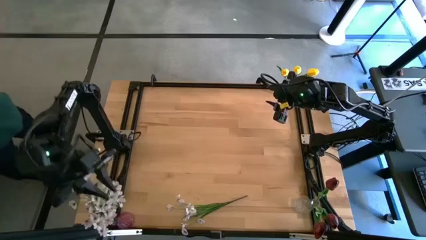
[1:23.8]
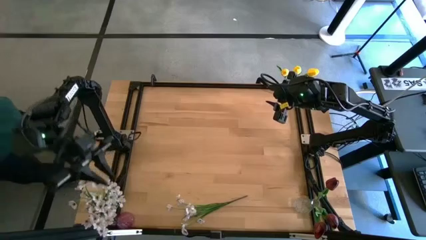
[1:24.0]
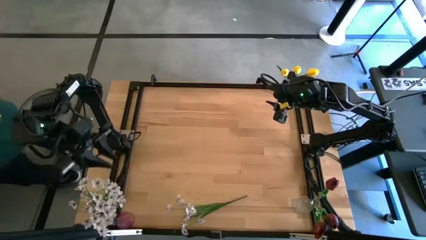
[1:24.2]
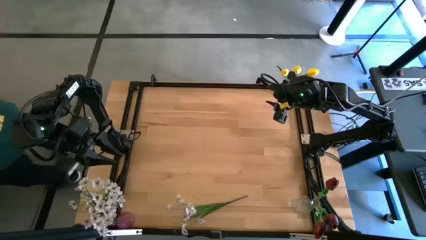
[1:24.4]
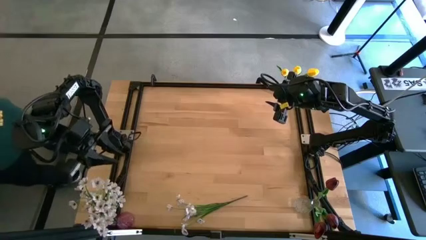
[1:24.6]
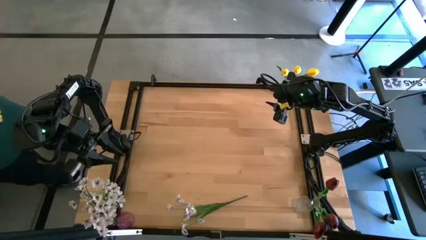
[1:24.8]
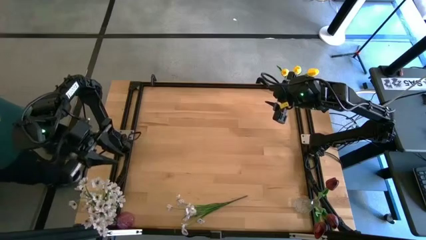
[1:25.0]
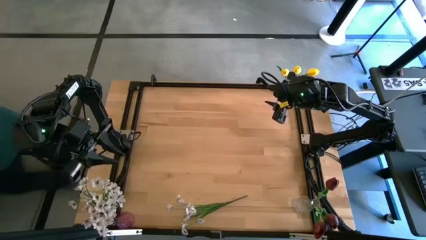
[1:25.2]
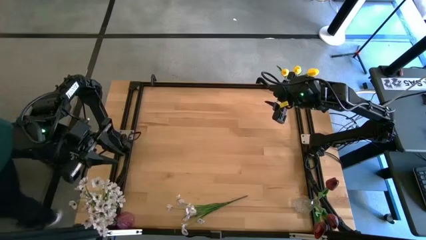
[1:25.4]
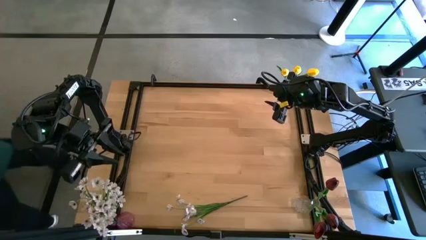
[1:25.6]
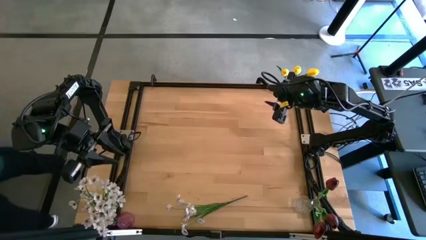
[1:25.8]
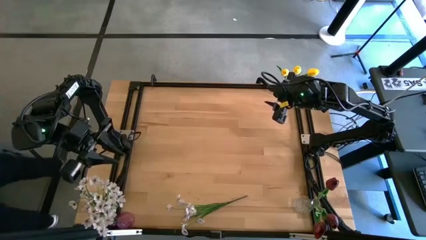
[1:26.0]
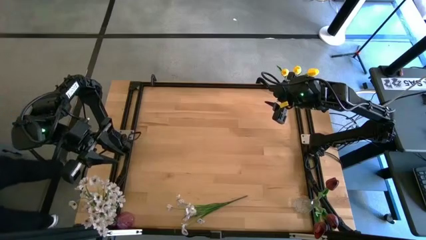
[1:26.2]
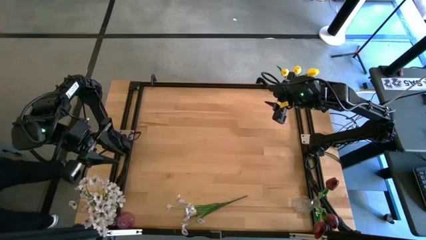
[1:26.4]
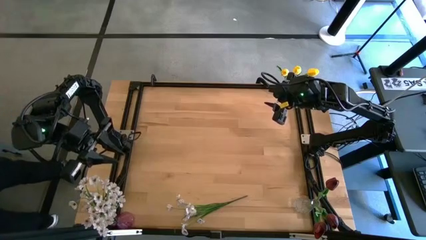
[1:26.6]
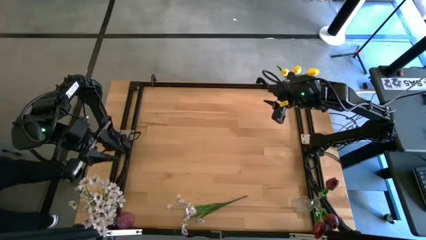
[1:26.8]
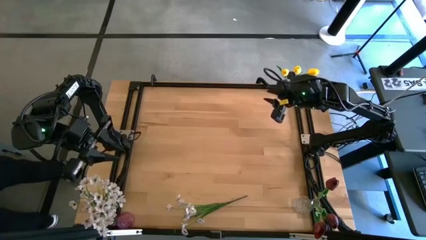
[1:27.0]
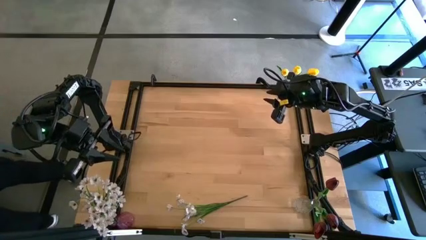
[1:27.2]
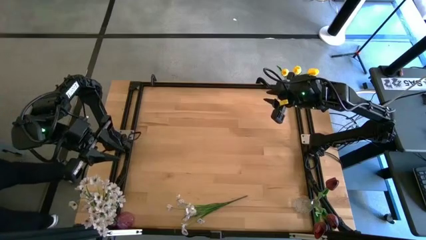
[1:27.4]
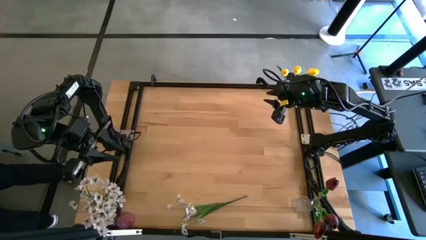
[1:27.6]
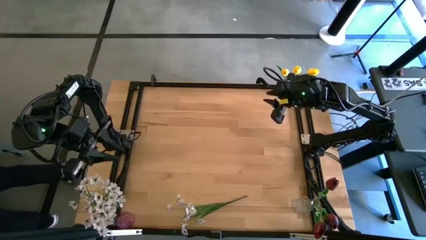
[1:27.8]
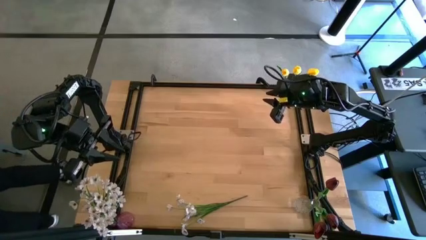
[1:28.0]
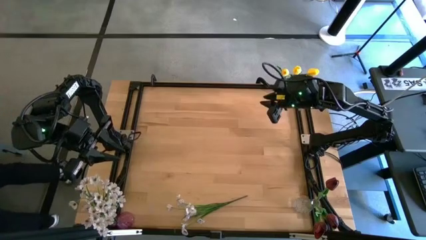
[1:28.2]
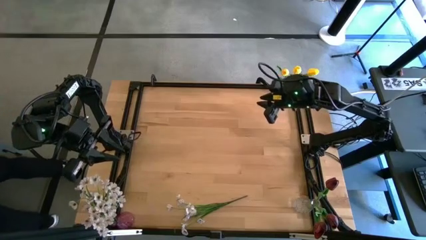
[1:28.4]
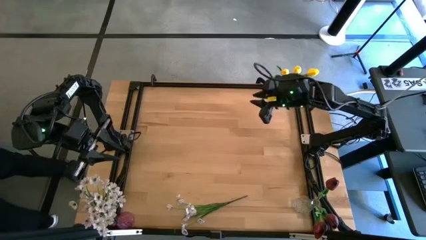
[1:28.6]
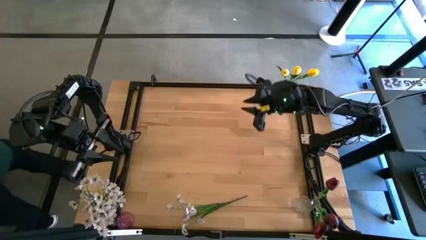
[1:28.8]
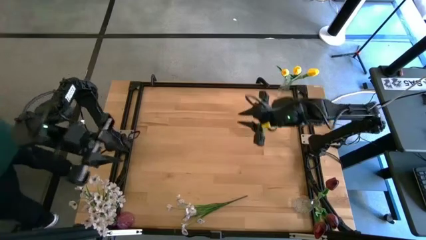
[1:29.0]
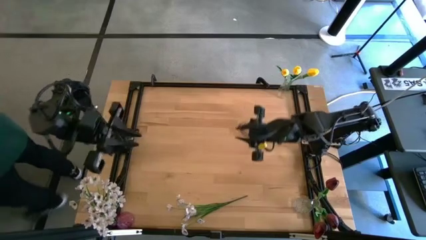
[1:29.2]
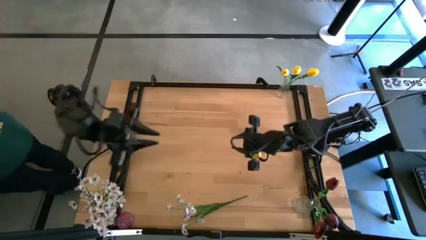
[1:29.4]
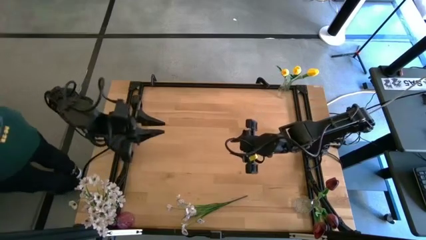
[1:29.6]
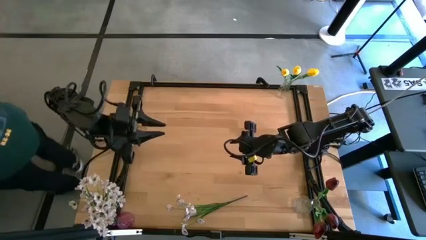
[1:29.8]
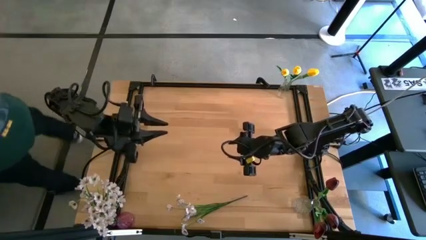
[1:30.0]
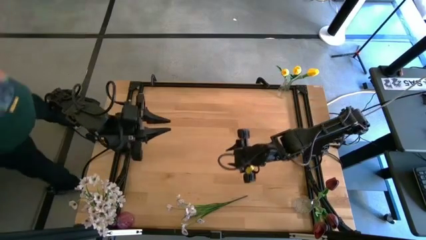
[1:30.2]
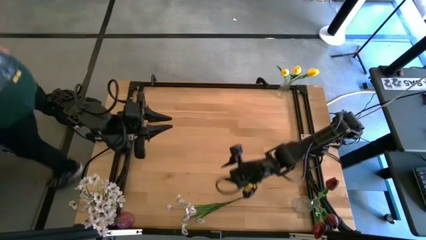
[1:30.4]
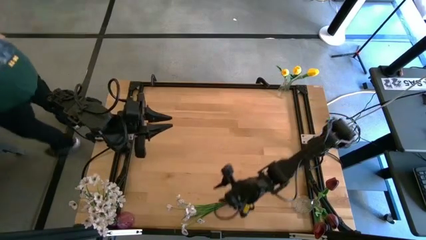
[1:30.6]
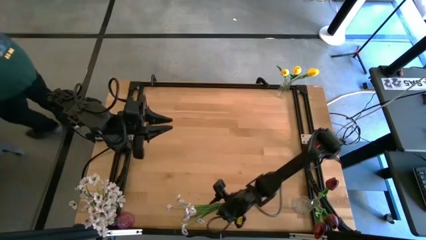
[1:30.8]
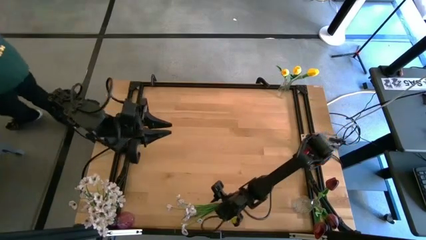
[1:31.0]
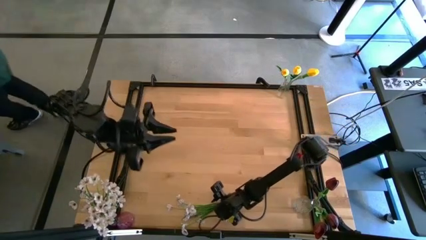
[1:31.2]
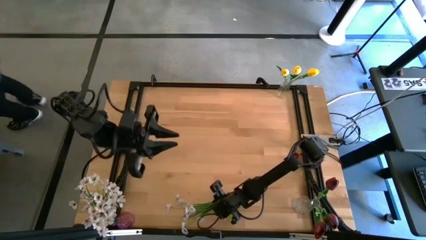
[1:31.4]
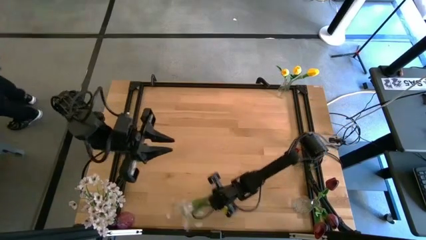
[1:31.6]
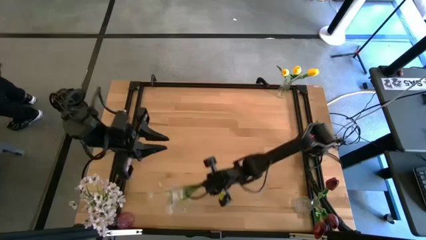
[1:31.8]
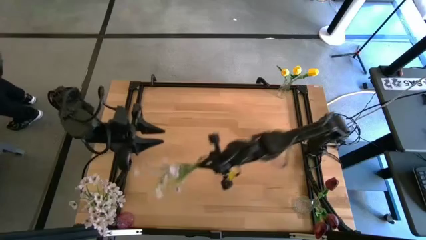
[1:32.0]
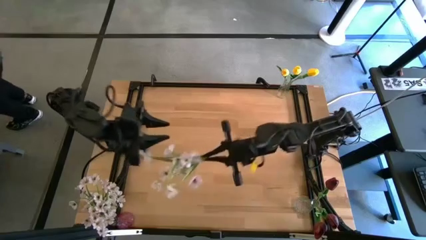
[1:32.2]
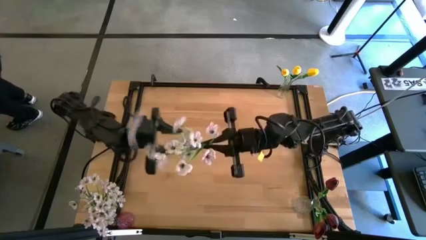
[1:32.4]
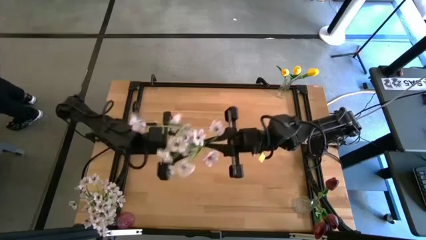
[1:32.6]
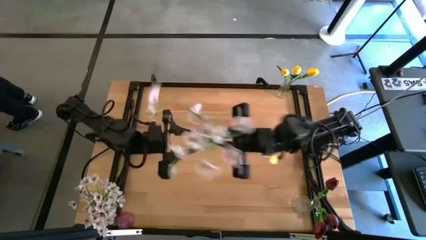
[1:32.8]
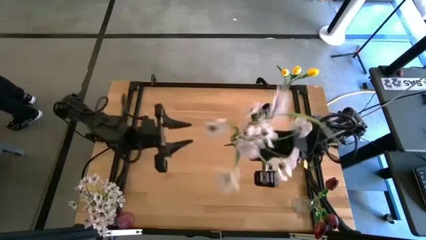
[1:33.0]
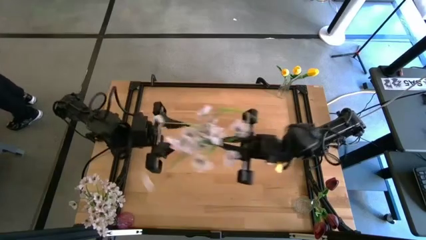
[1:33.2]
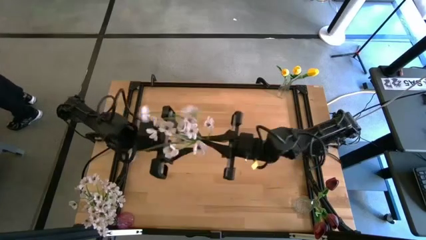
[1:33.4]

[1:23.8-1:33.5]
Task: Sort flowers into vase by color
Put the white flowers into the pink crystal vase

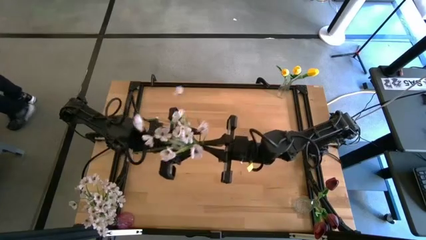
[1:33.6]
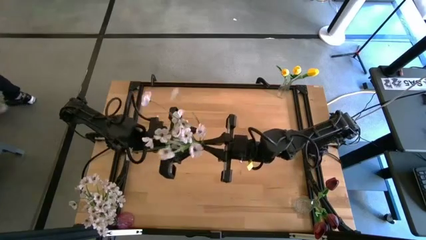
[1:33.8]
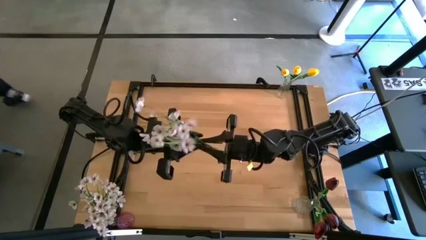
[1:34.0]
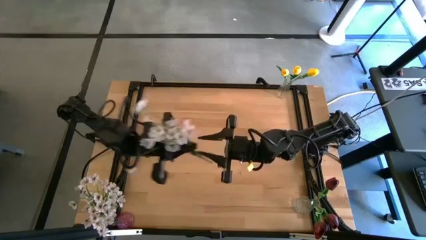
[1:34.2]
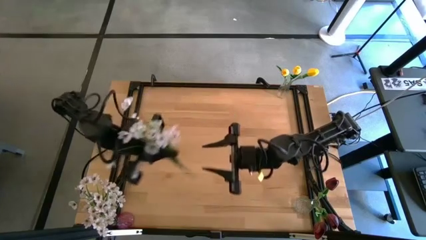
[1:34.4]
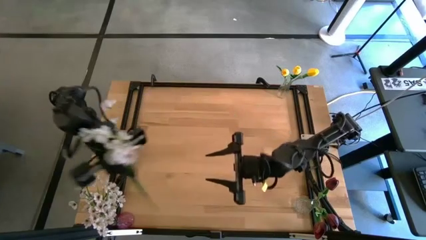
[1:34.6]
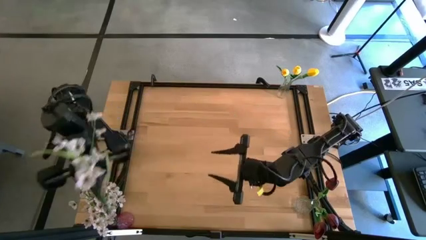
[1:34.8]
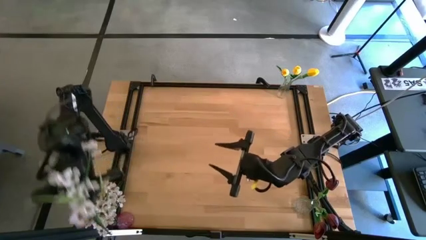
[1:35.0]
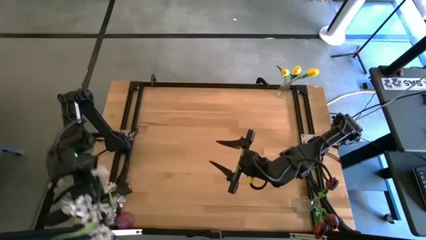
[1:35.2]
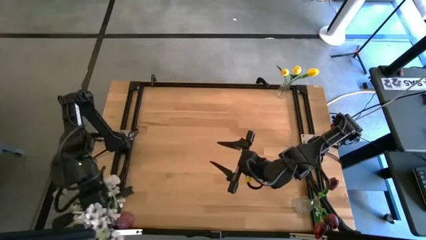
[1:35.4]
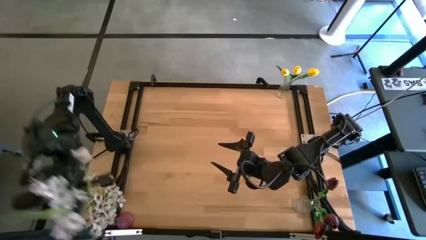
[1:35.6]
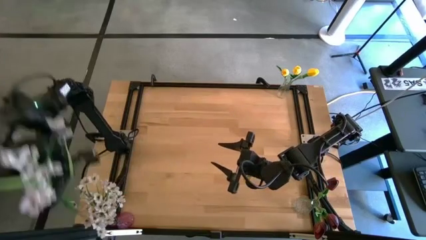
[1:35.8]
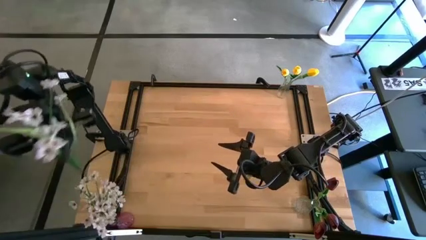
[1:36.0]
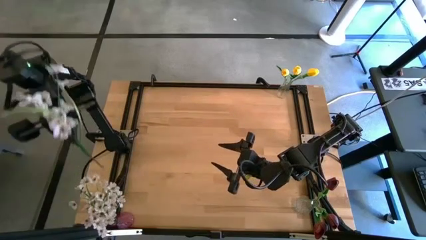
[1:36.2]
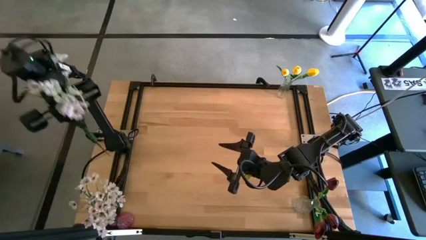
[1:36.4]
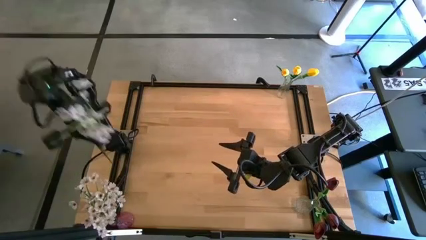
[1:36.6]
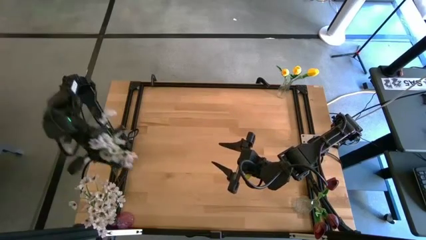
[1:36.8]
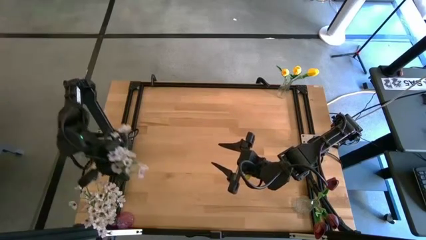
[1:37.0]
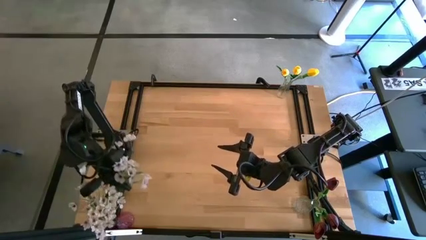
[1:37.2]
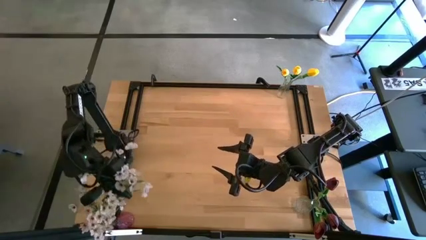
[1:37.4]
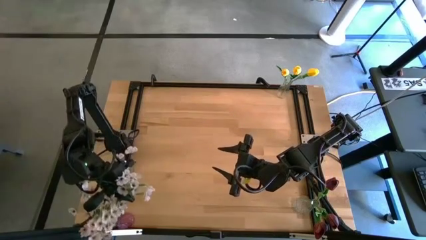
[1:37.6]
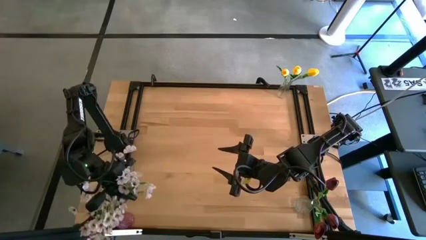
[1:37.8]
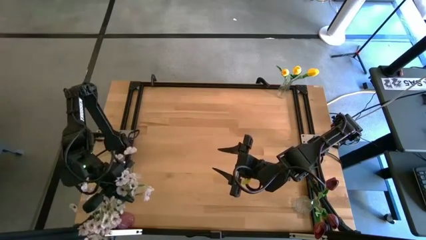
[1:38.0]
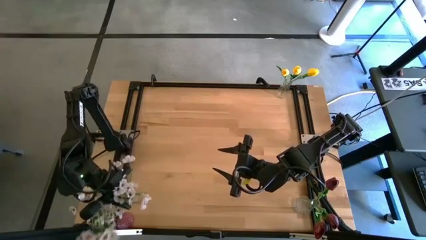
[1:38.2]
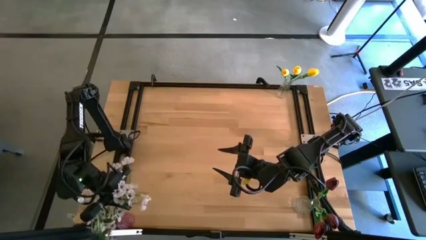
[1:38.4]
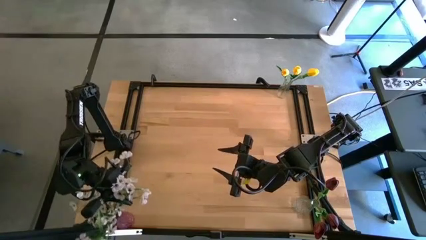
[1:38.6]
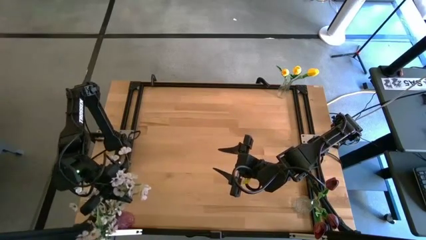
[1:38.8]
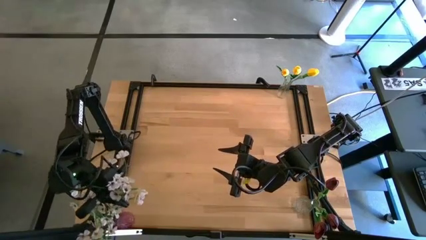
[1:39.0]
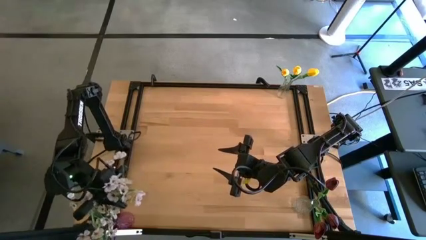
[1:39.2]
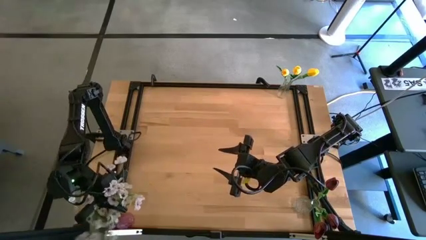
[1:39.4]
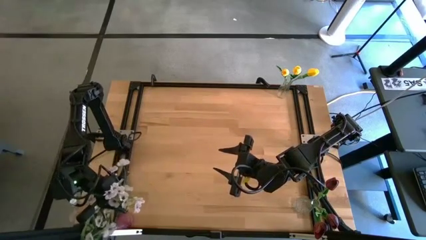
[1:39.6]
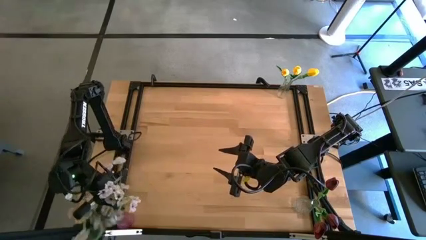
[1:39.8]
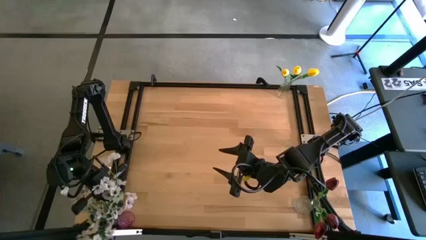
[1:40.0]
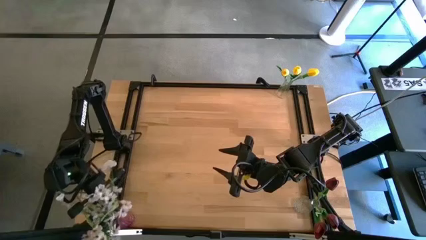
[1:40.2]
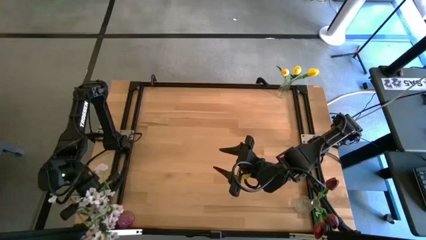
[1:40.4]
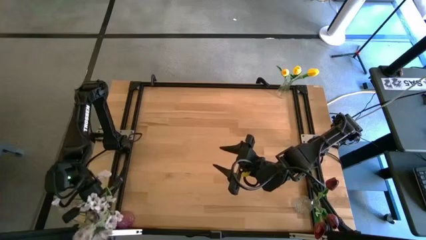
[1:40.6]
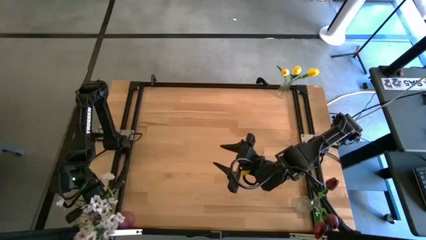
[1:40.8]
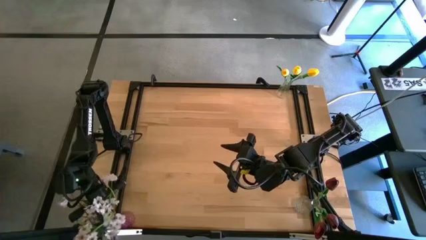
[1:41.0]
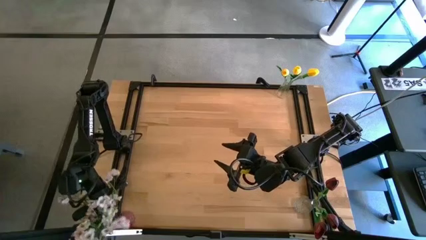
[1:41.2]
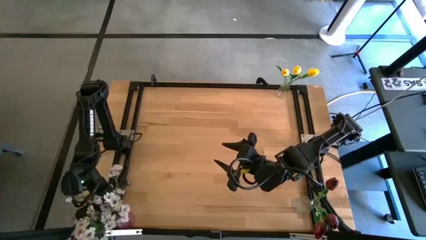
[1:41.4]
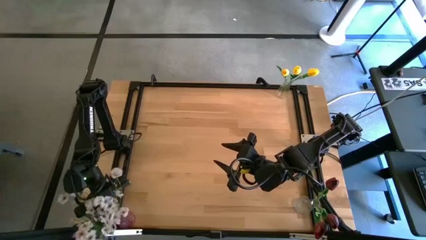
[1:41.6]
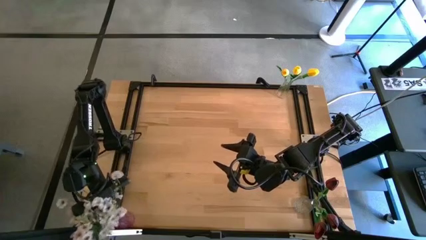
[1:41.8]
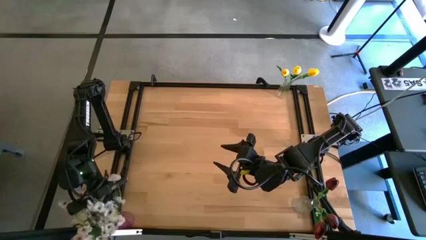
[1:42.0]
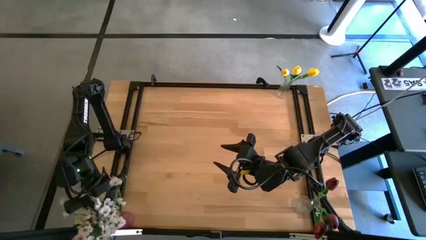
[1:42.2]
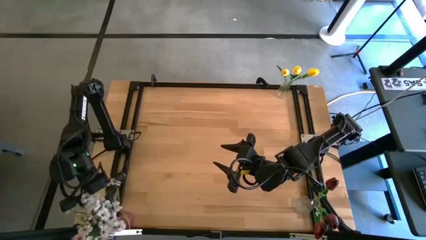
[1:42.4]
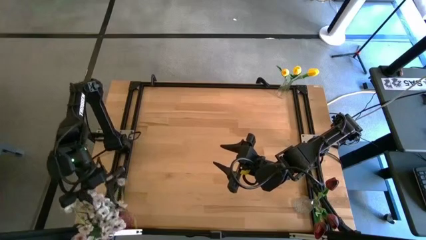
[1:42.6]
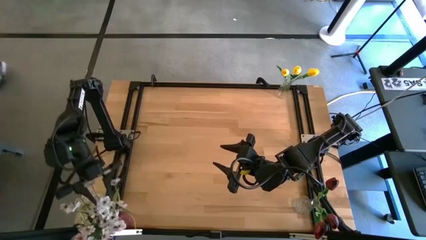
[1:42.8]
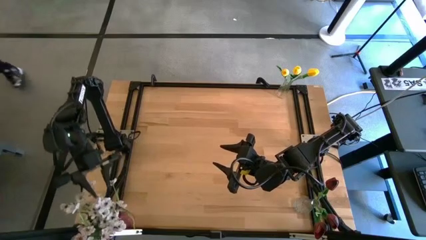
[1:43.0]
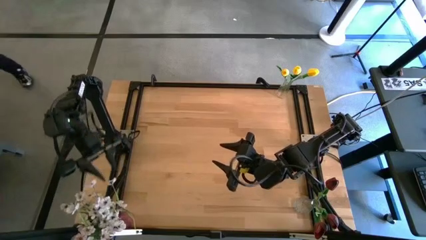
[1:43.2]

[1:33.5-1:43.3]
Put the white flowers into the pink crystal vase
